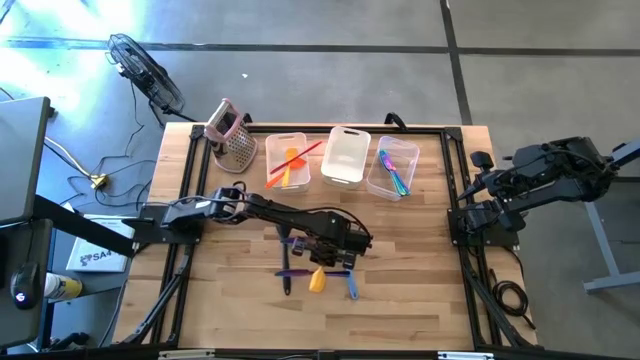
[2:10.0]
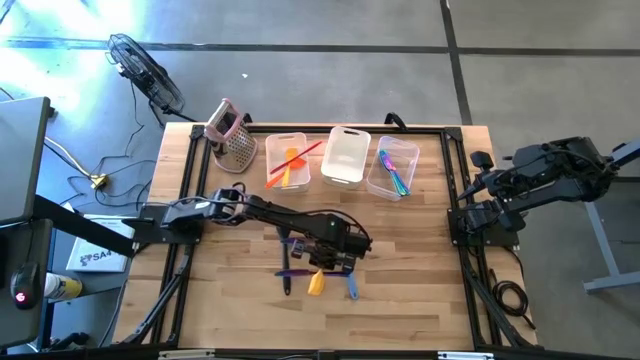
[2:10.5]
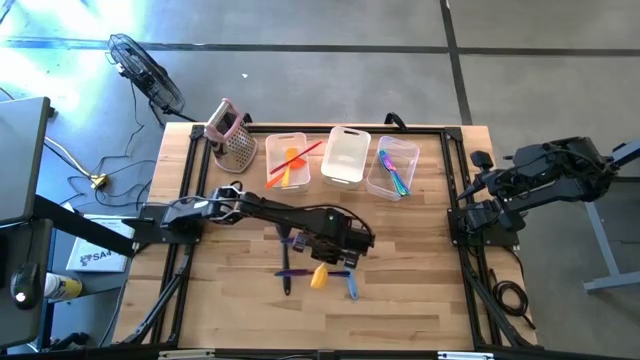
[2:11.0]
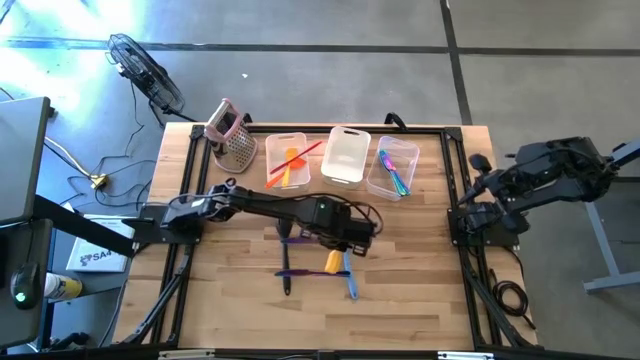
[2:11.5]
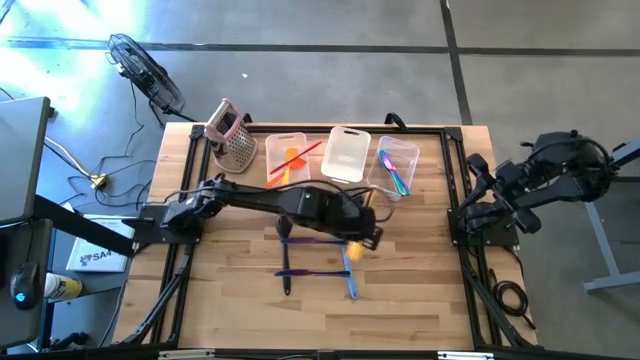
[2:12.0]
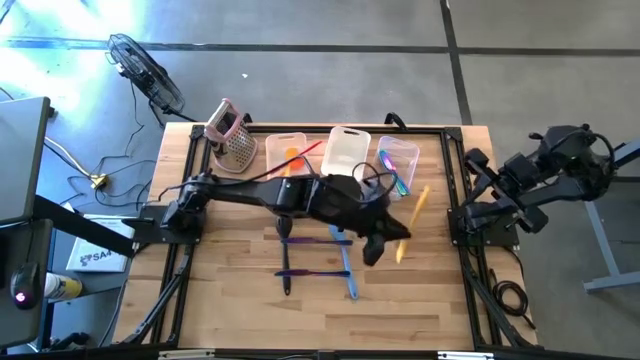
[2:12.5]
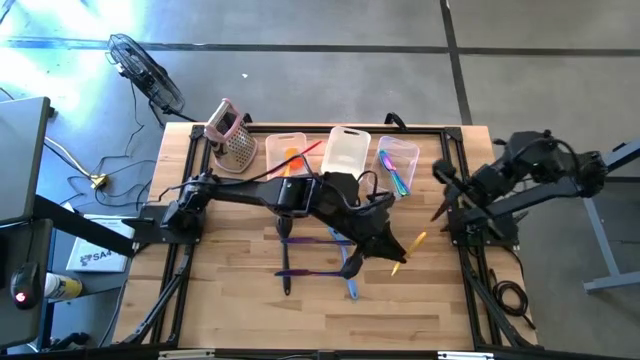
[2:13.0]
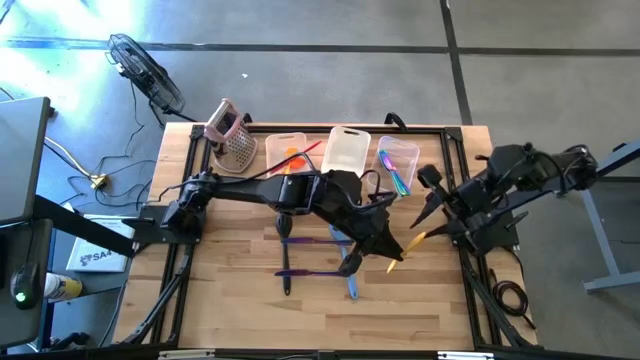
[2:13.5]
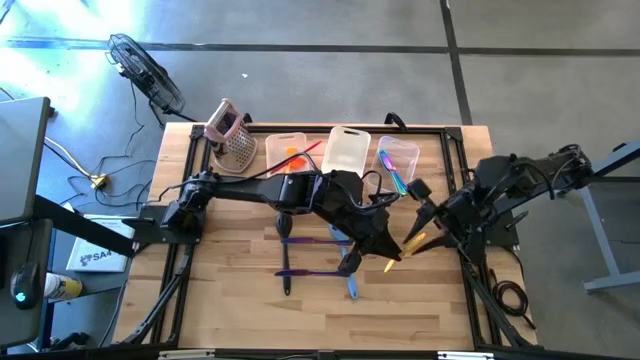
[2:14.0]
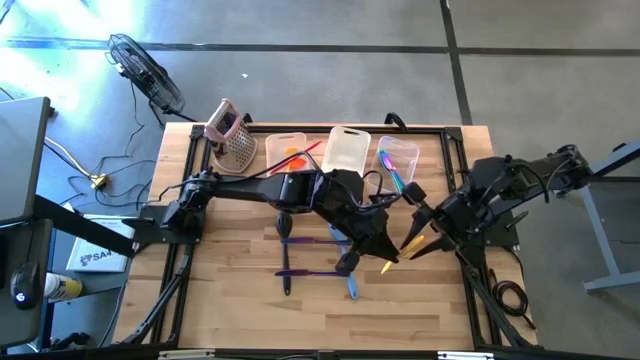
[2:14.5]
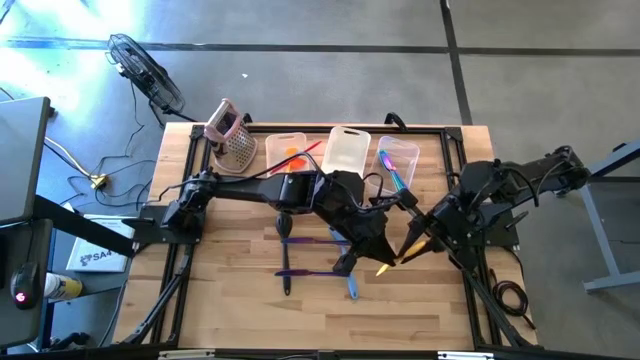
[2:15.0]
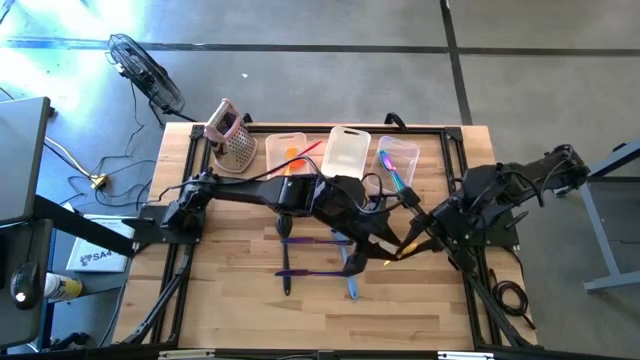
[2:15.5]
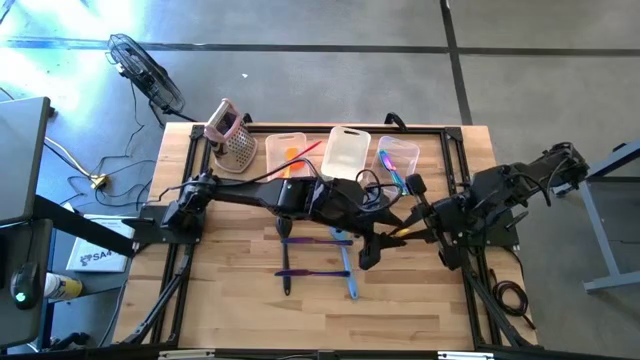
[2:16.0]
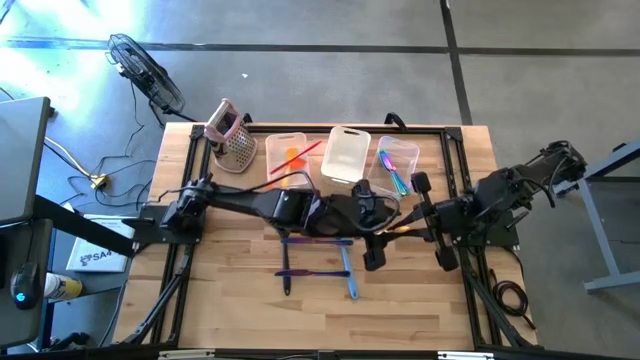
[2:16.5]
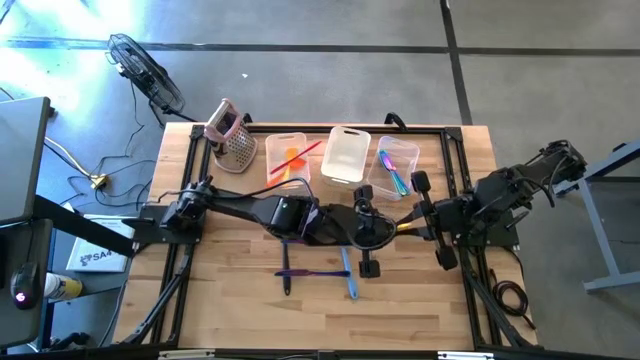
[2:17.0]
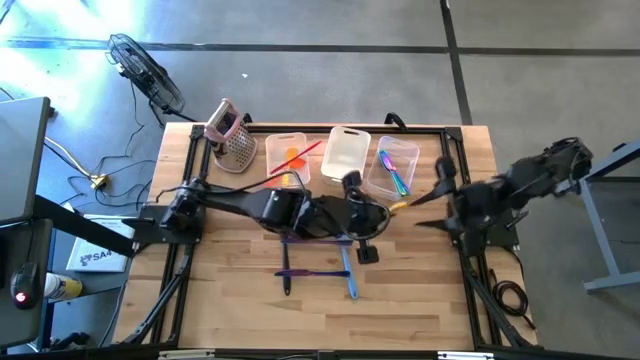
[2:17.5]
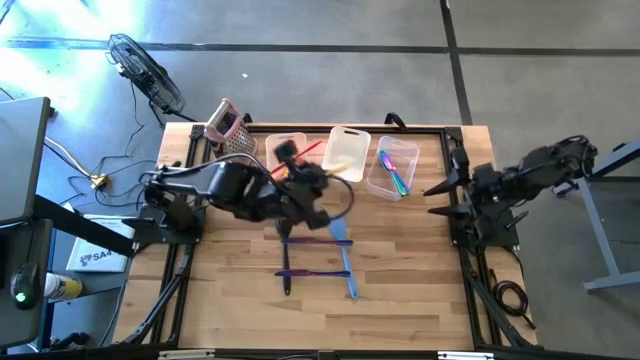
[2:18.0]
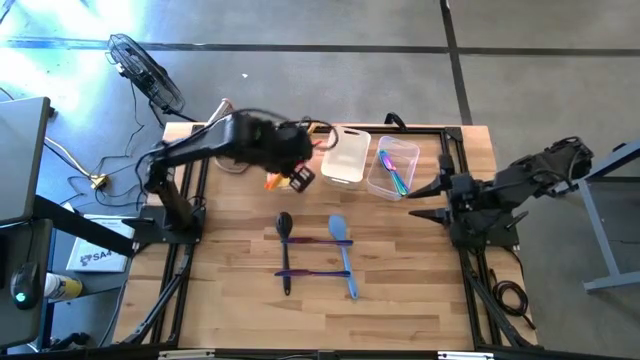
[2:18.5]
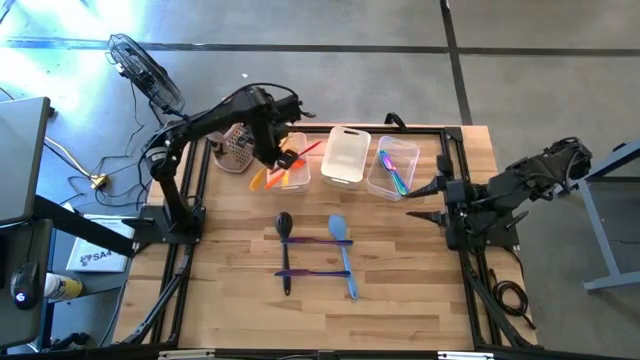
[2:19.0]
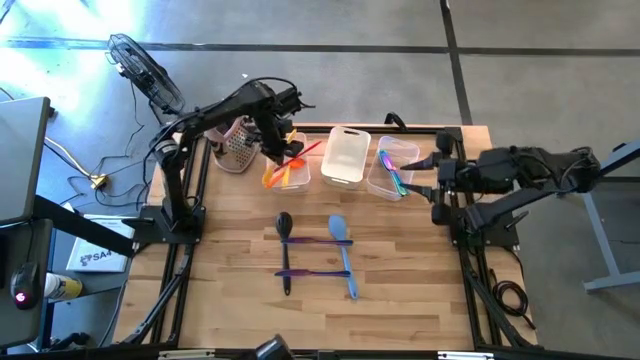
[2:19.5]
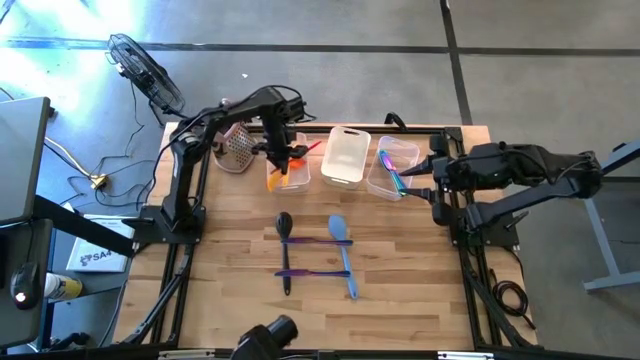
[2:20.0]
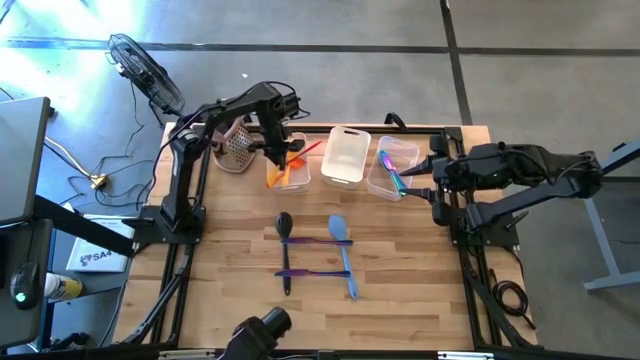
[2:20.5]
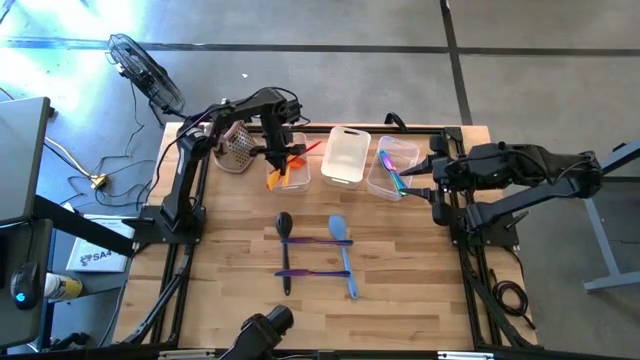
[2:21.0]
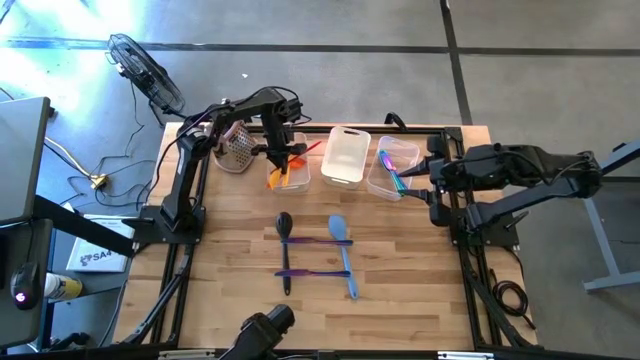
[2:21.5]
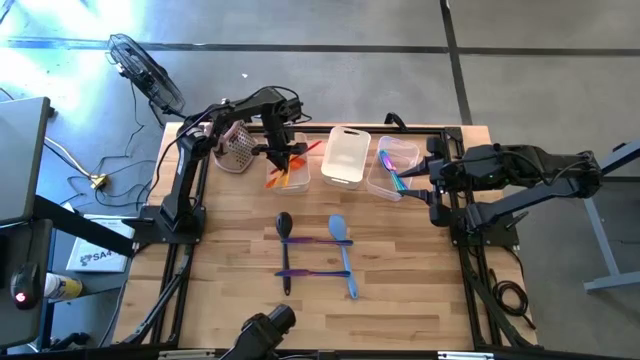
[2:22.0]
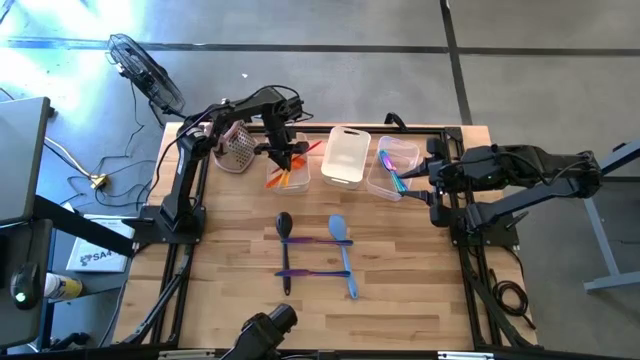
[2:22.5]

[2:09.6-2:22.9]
Task: Pick & Place Kitchen Items
Put the yellow spatula into the left white bin

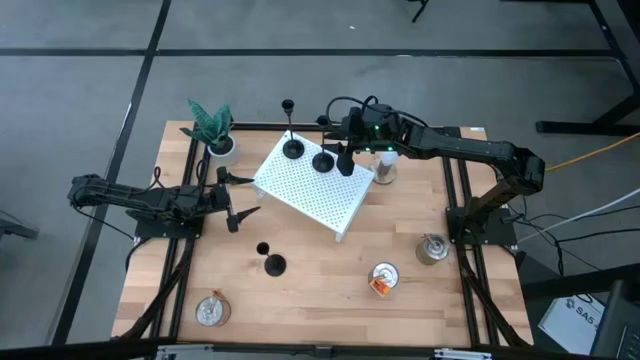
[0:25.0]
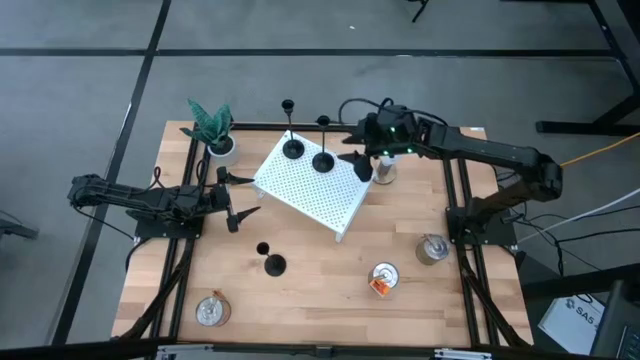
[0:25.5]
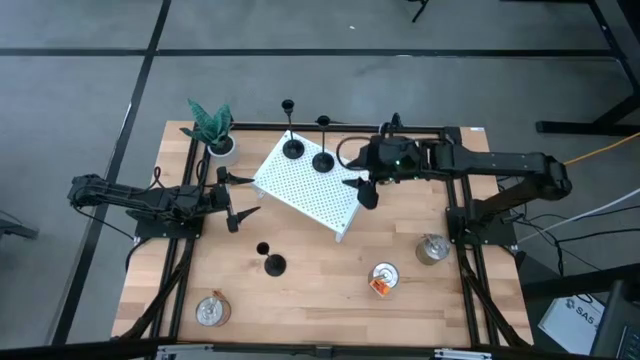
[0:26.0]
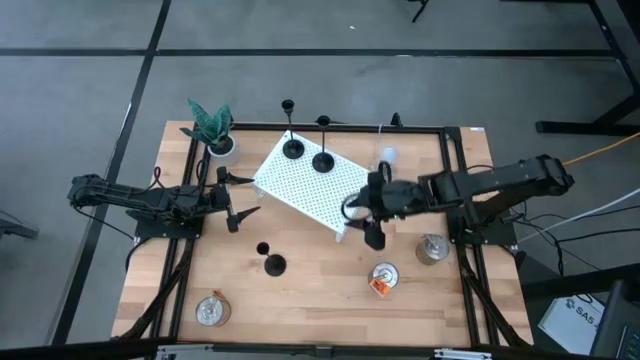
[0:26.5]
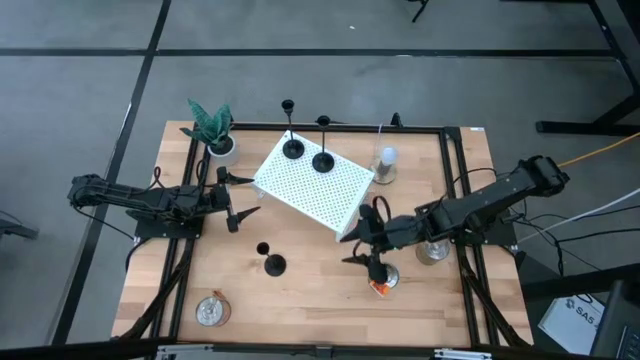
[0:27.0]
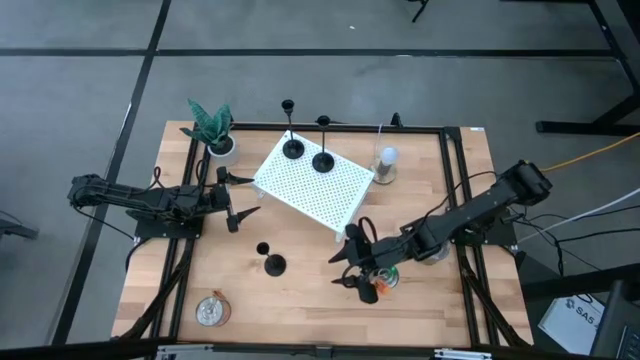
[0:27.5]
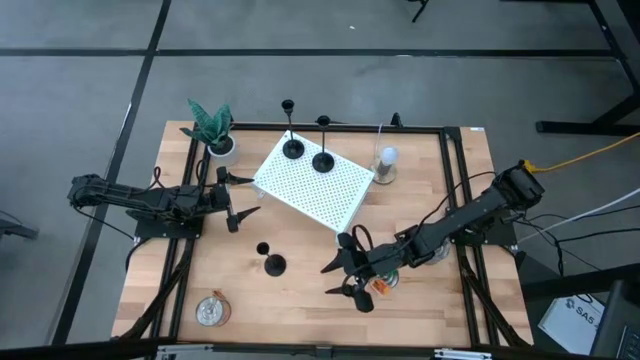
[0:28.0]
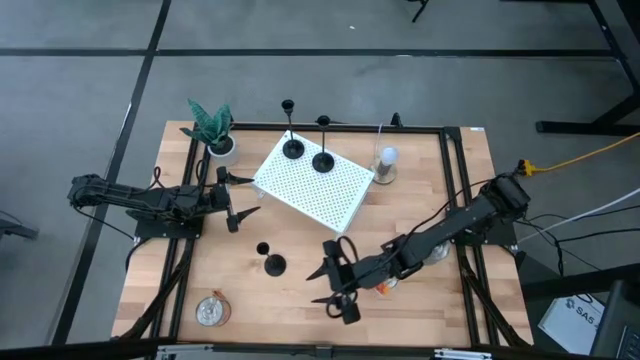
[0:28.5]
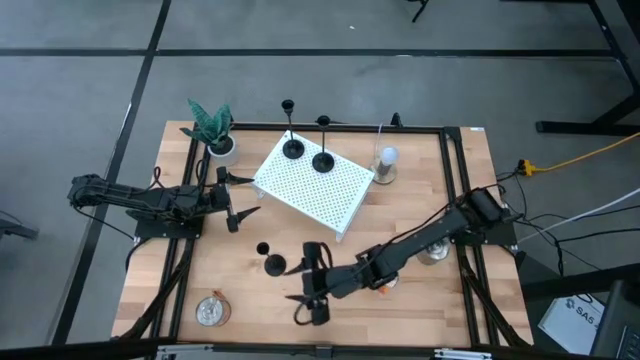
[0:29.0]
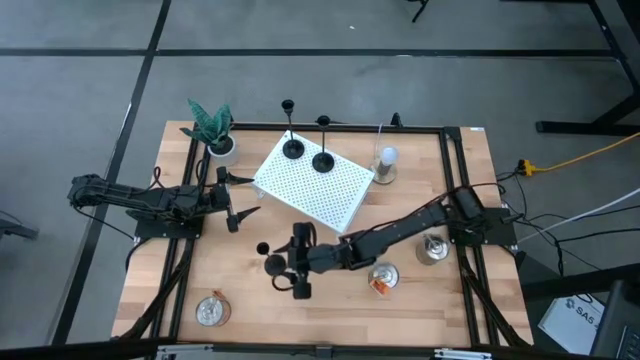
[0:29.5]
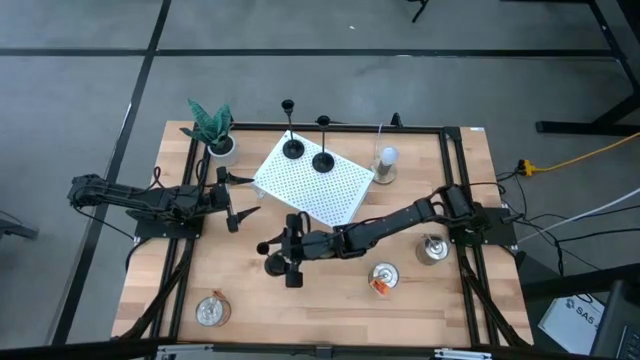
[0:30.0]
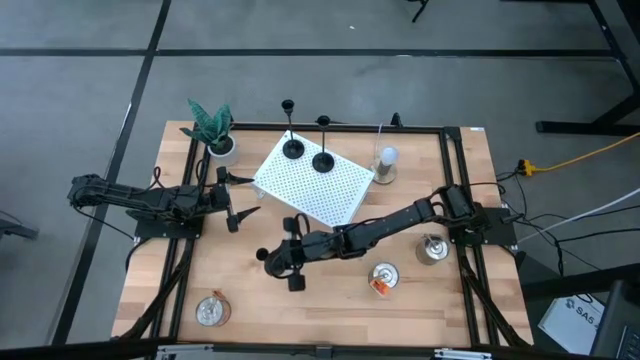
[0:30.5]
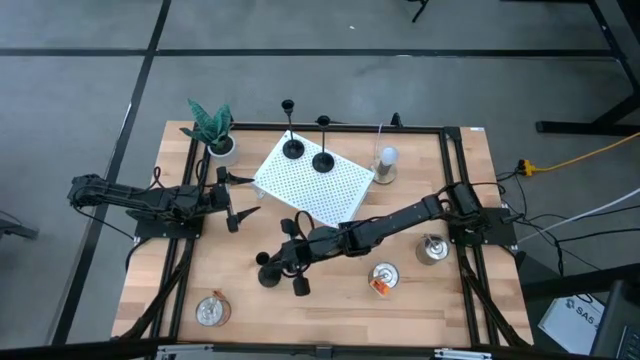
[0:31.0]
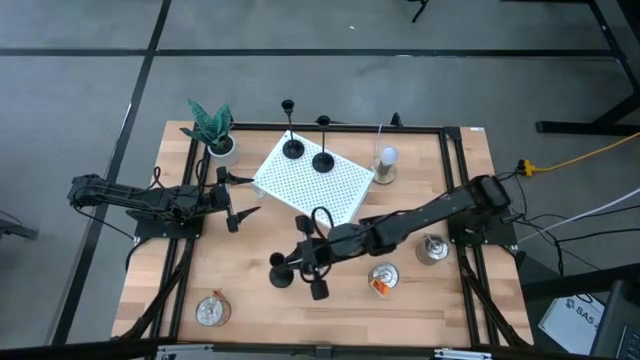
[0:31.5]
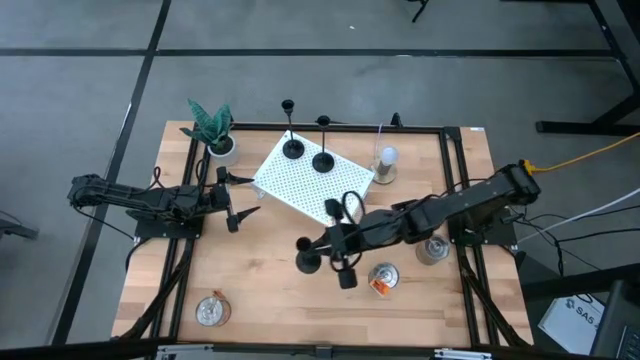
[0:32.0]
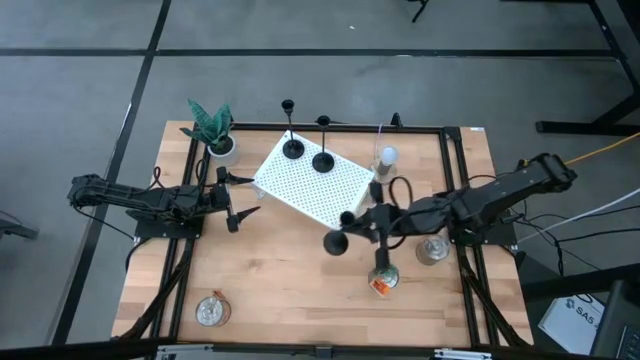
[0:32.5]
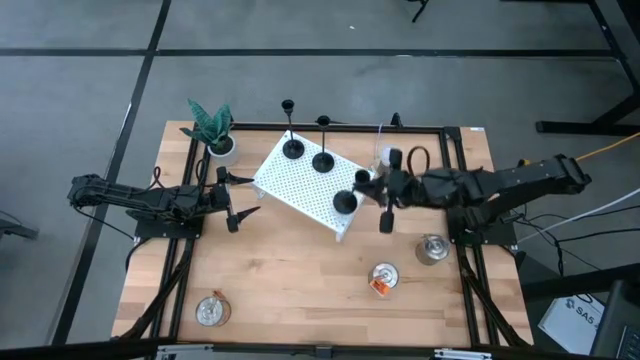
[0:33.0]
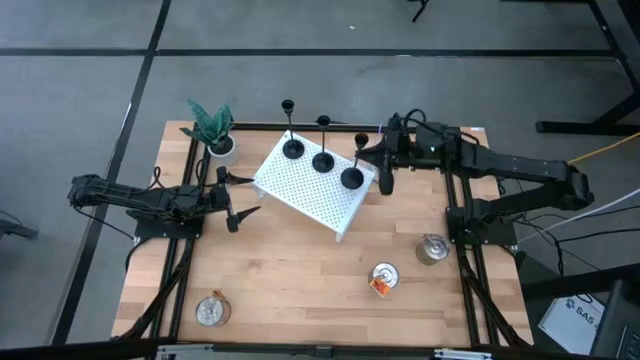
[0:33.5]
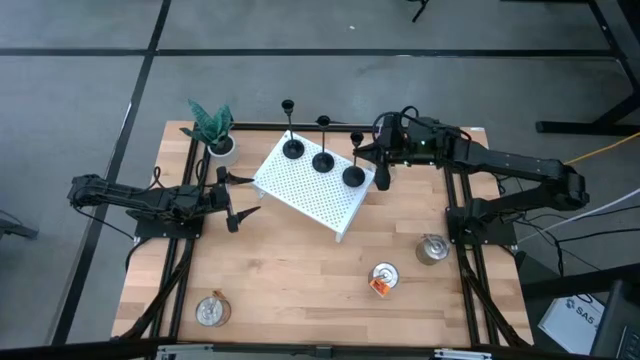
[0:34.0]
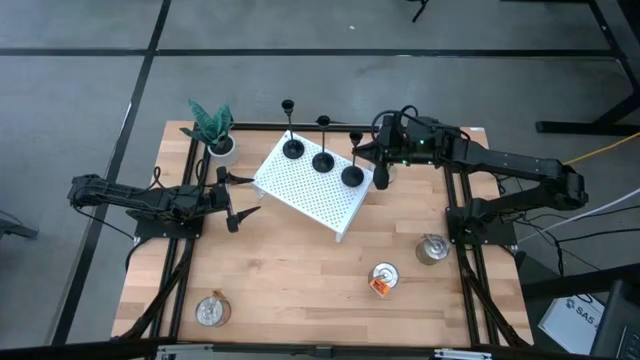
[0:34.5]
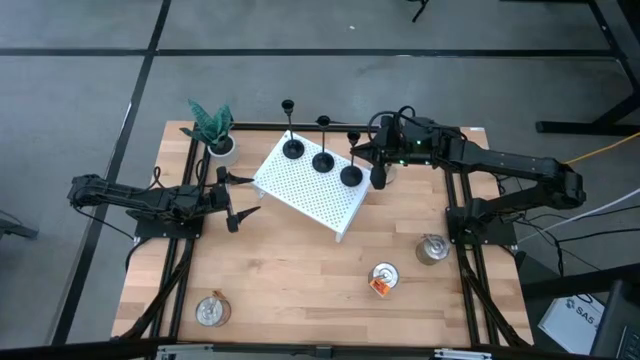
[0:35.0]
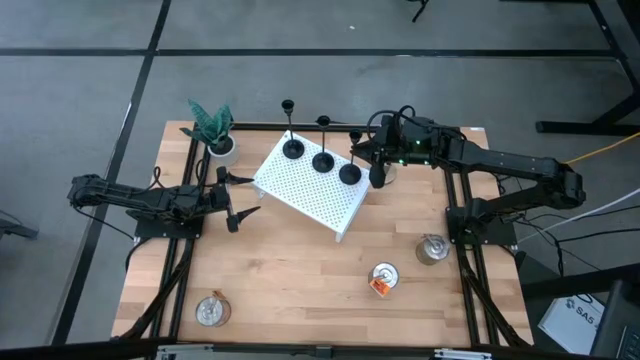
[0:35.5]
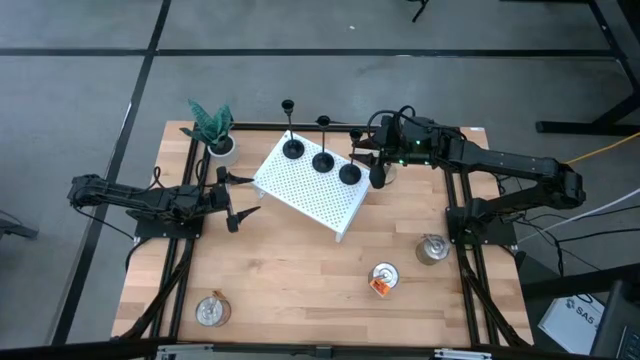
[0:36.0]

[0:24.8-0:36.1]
Task: Pick & Place candle stick holders
Put the black candle holder on the shelf
